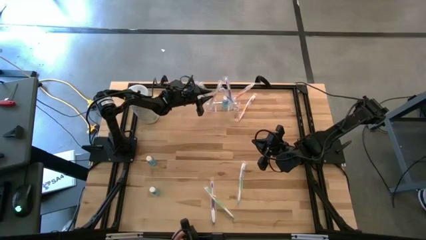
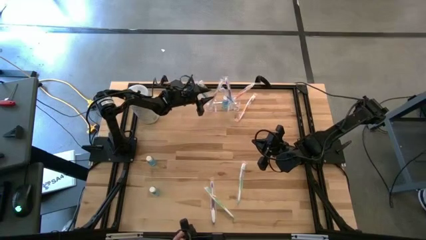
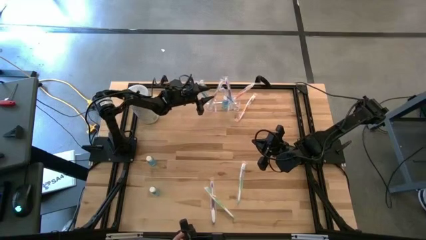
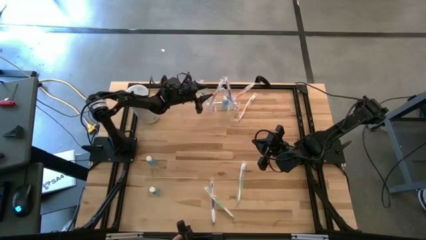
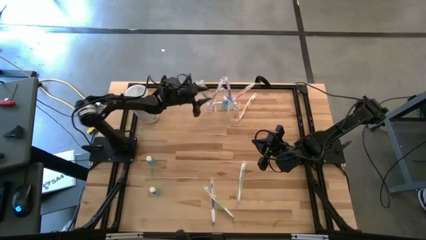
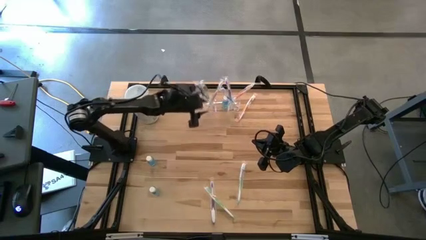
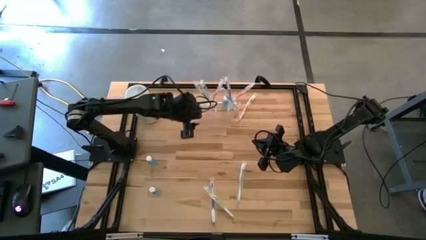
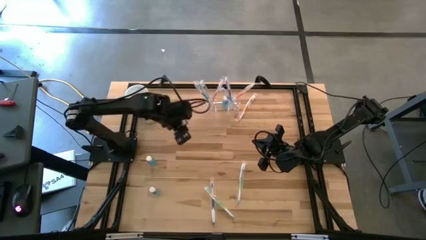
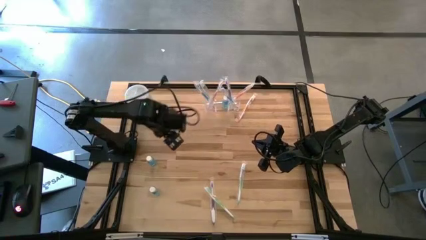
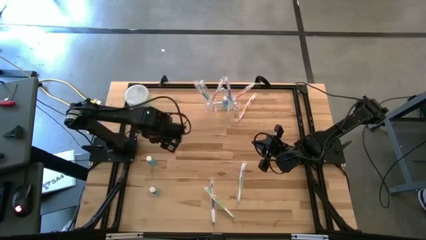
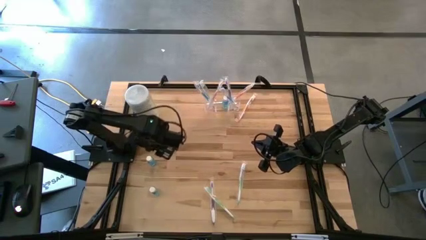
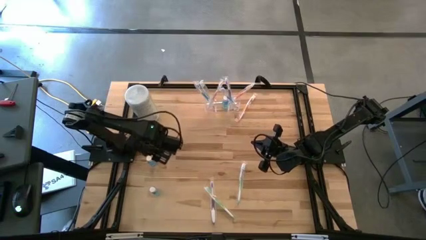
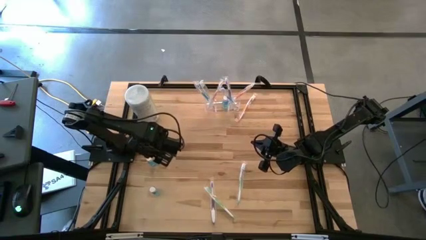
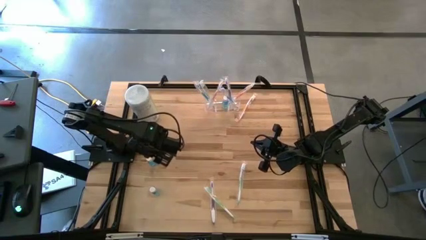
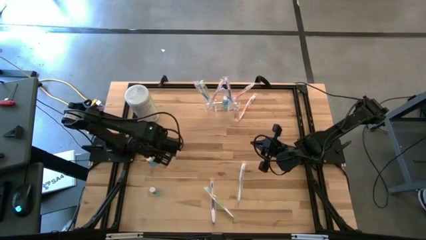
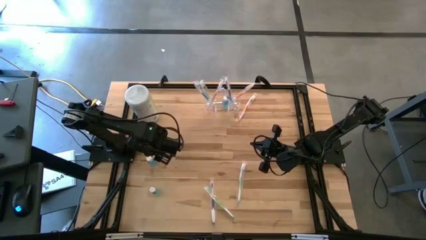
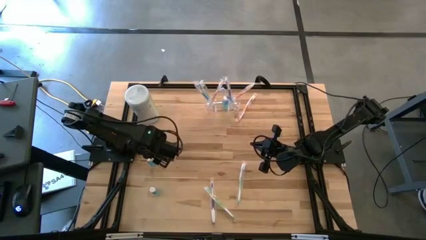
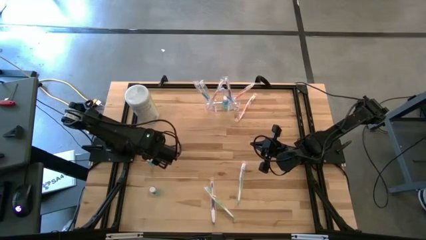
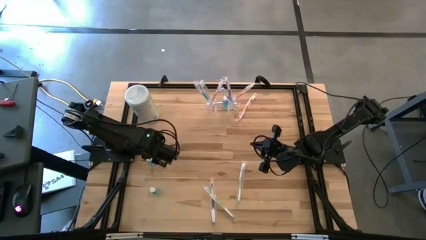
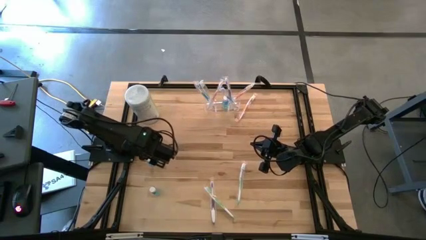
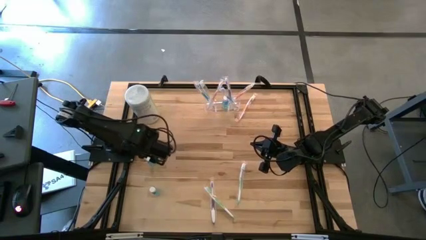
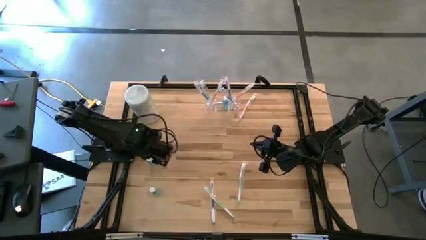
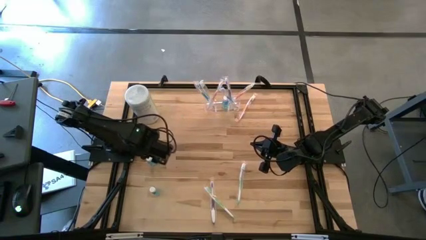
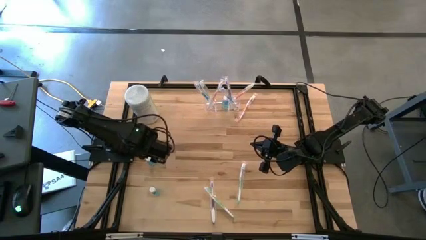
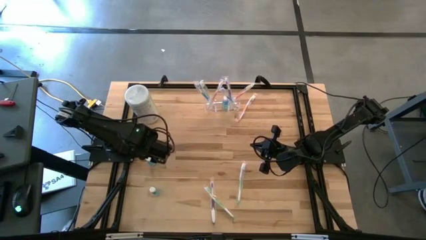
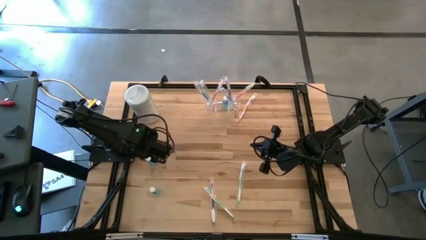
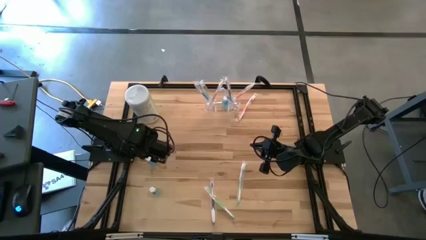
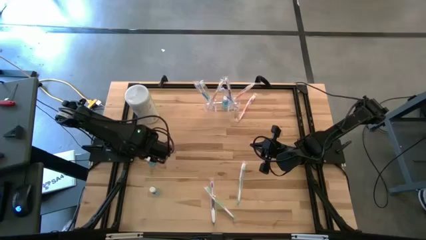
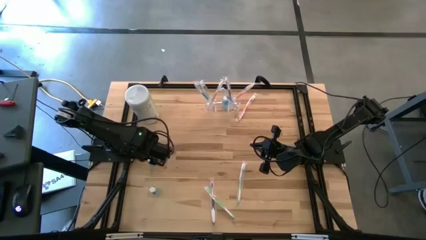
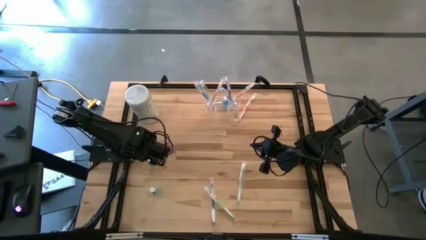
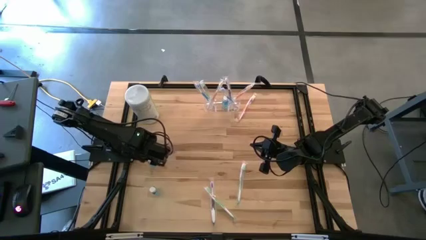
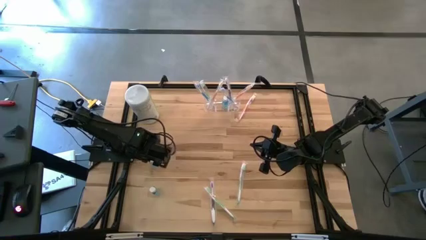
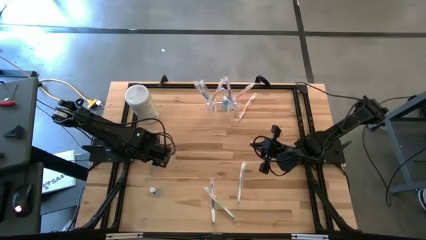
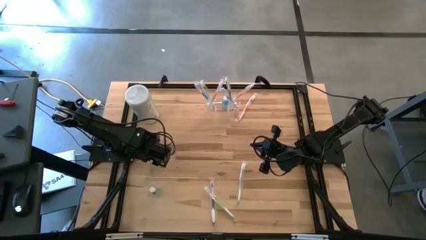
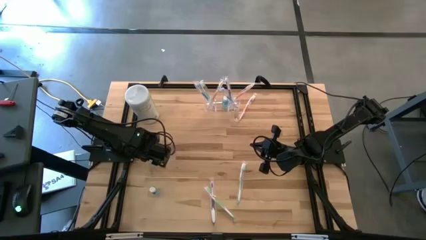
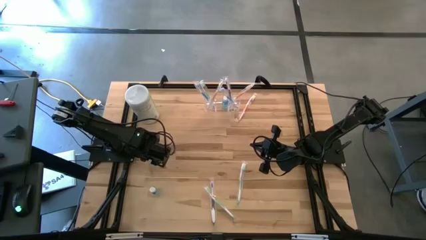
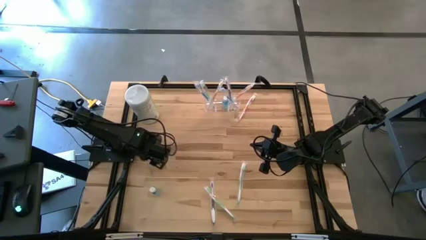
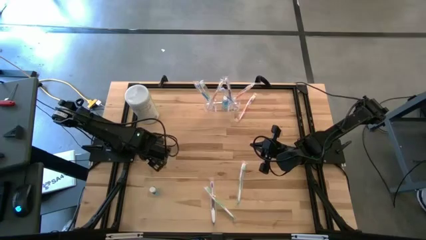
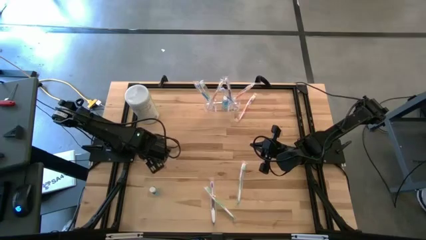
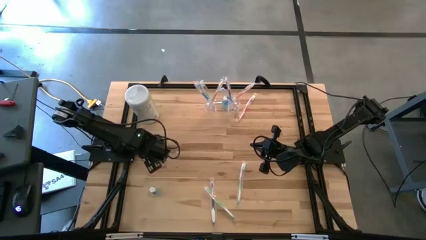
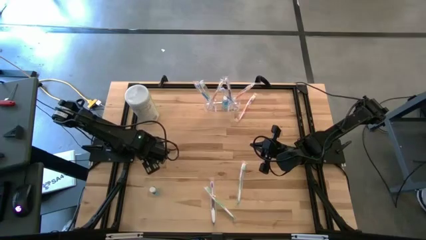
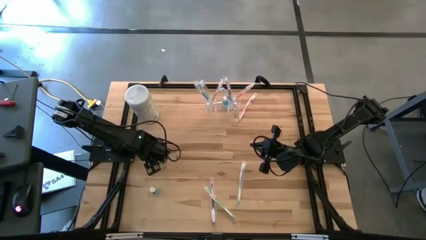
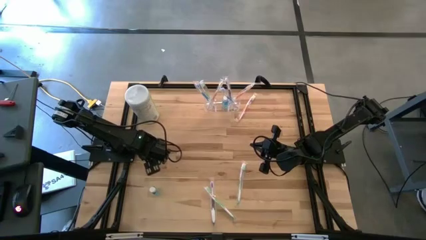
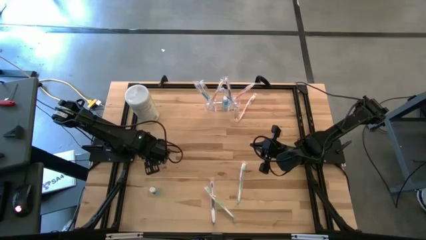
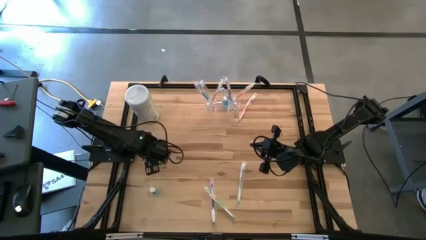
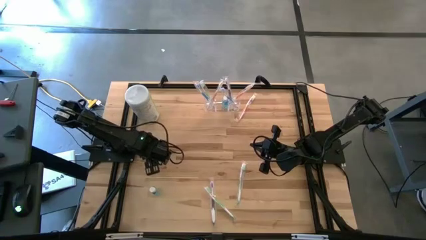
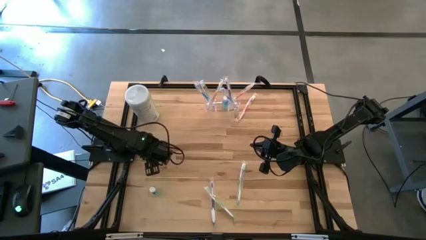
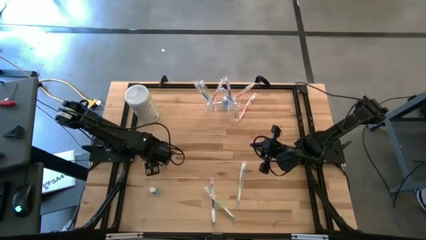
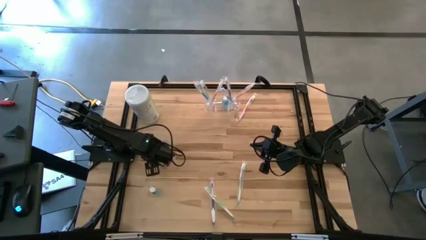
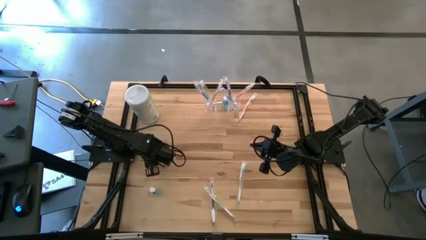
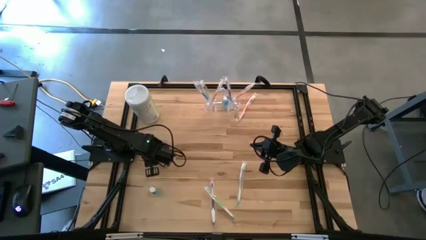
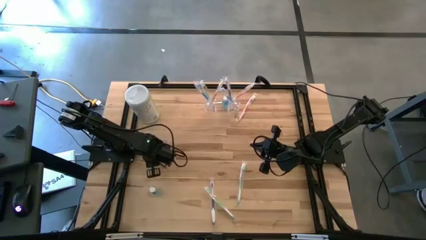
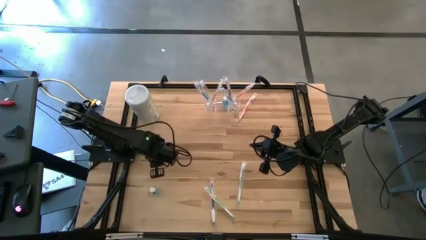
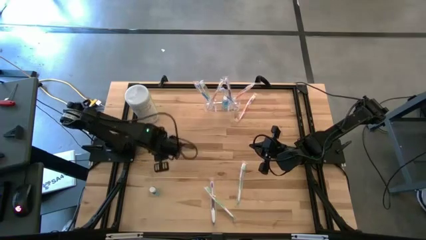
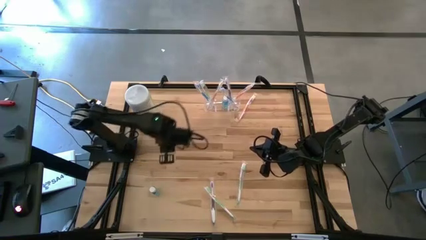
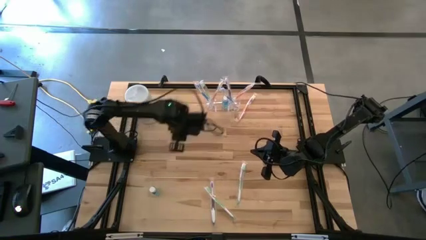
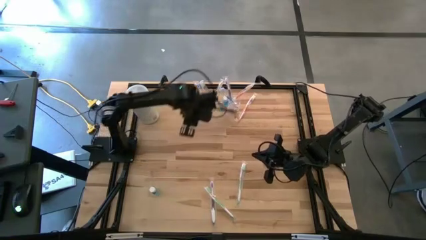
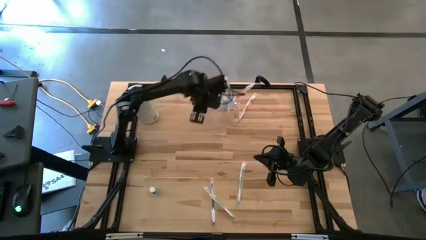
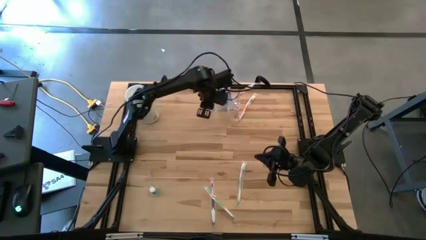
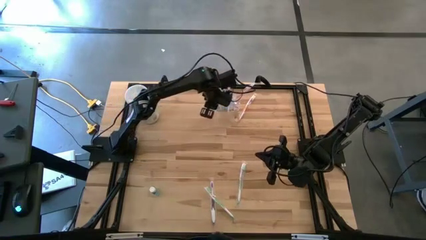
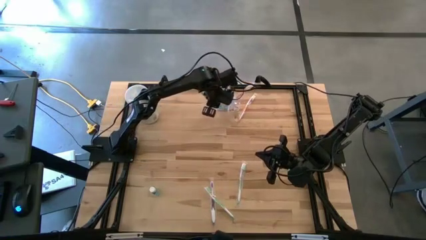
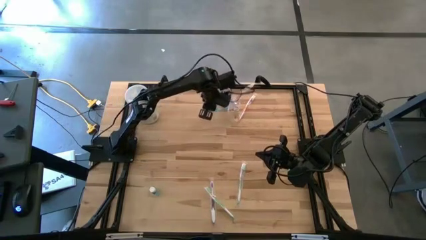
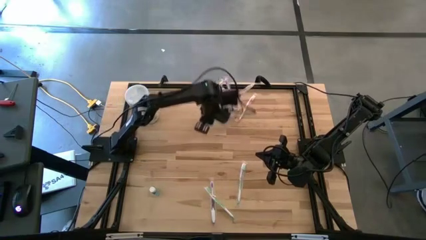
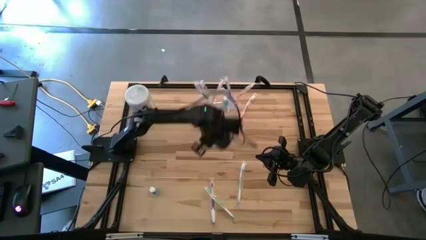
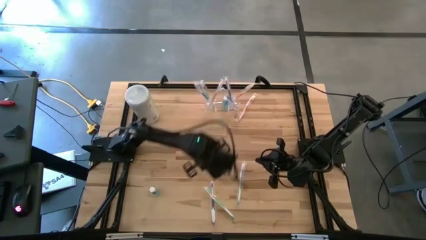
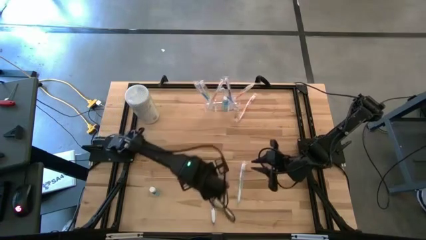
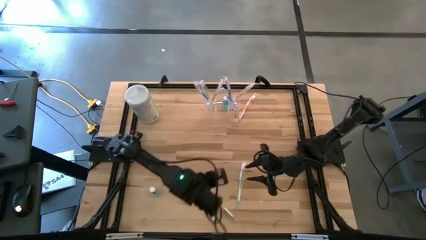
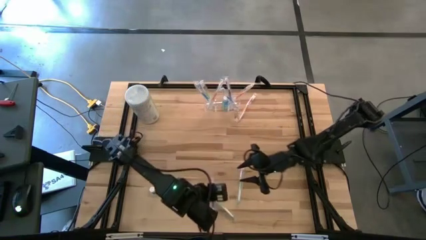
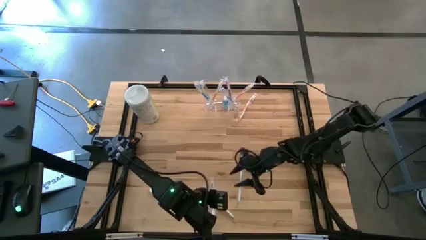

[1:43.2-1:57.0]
Task: Pick & Place toothbrushing station
Put the top mouthwash into the transparent organizer

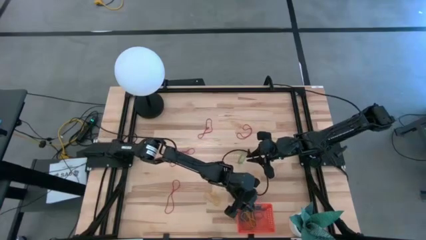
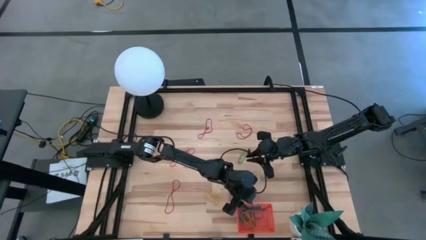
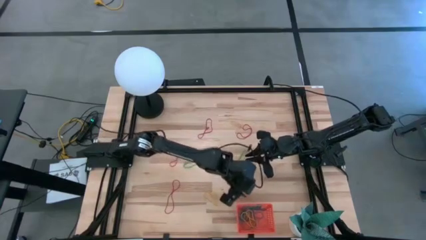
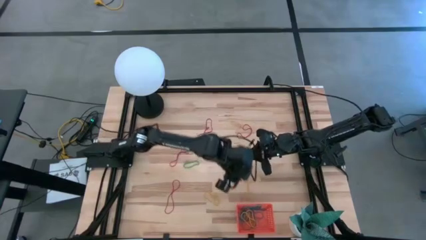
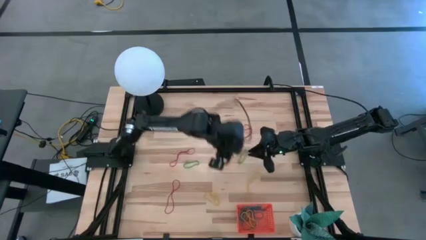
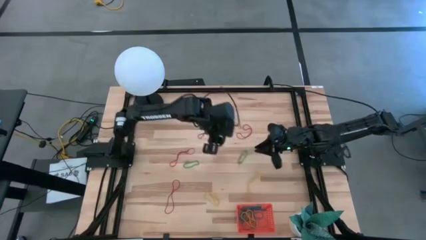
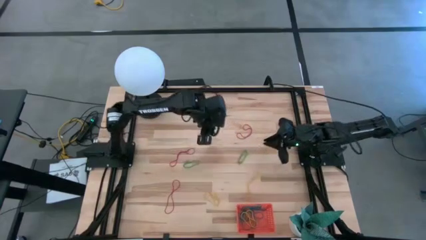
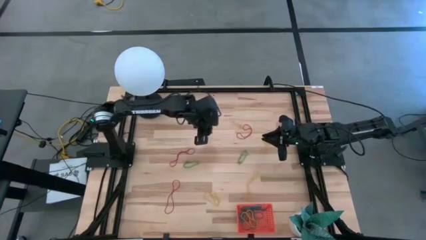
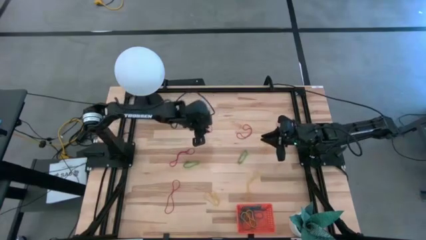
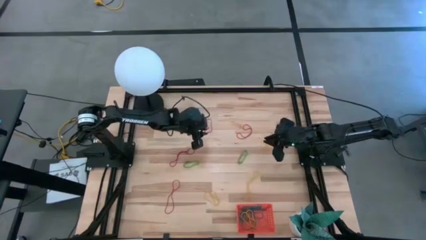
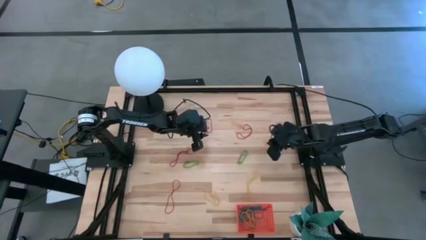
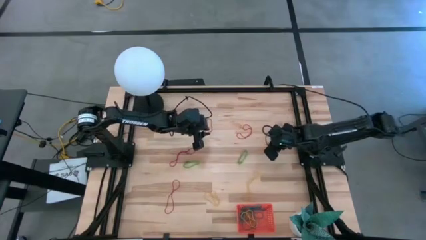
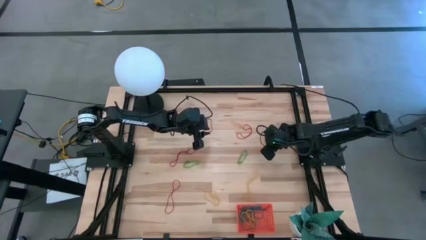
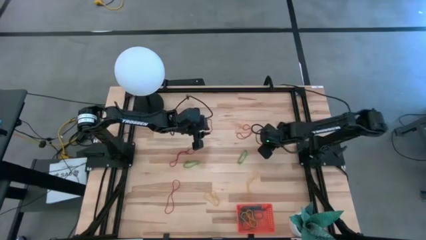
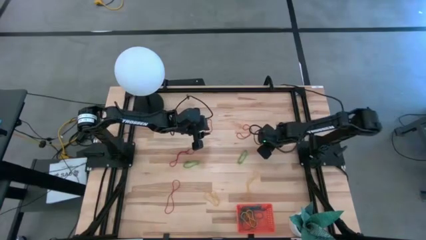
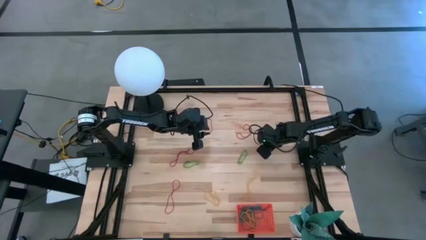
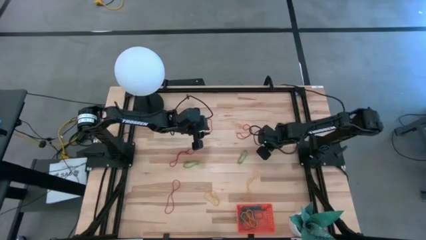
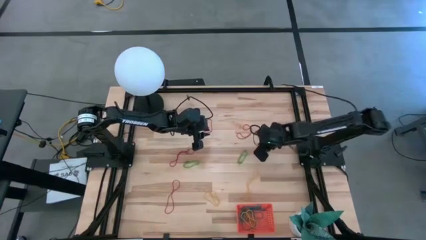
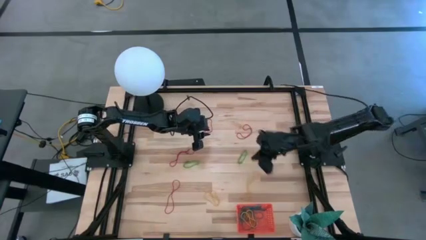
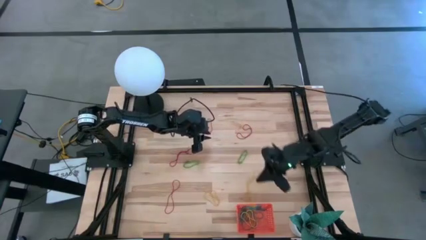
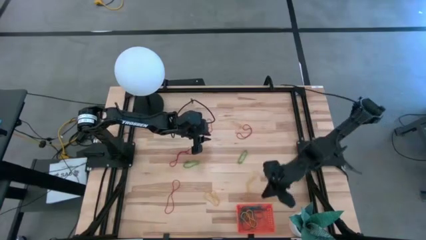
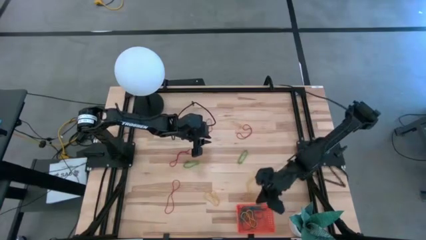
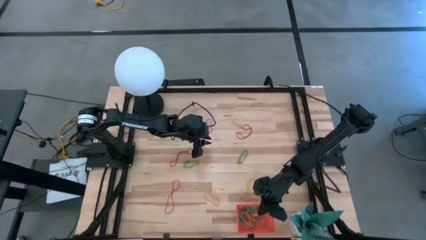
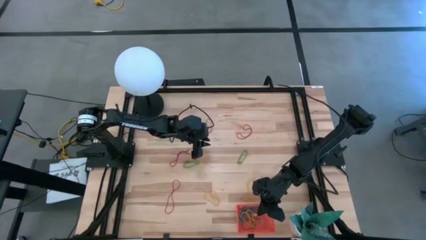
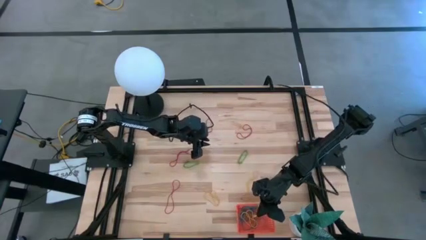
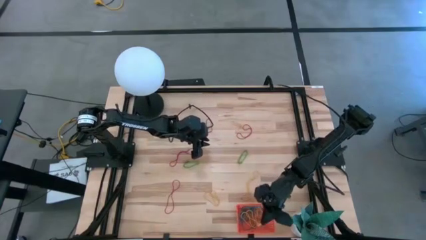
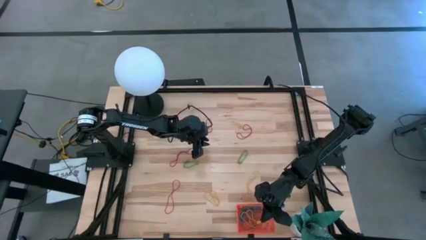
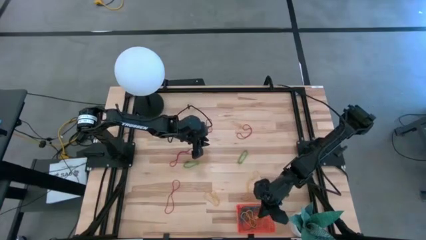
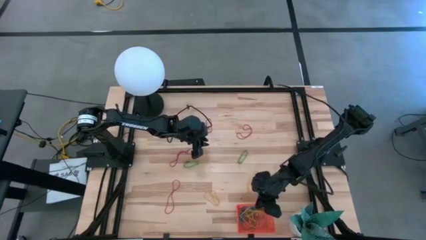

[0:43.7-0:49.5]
Task: Pick and place items into bin
Put the yellow rubber band into the orange bin
